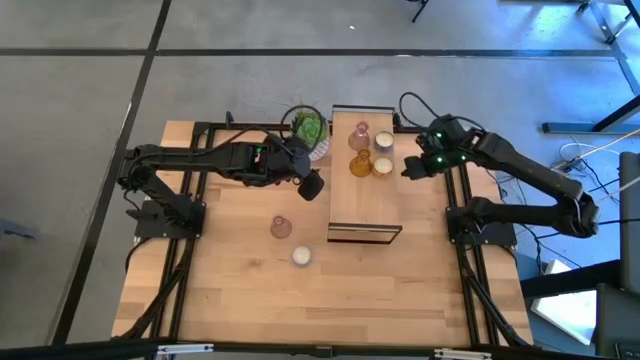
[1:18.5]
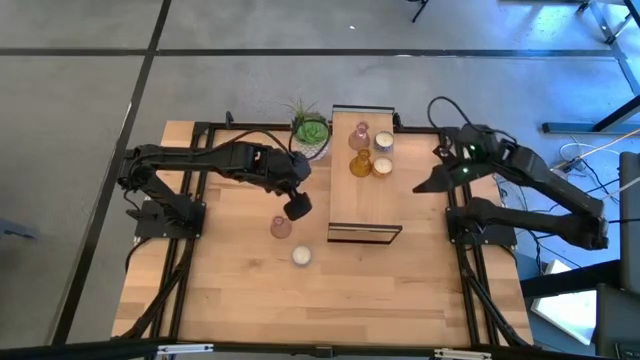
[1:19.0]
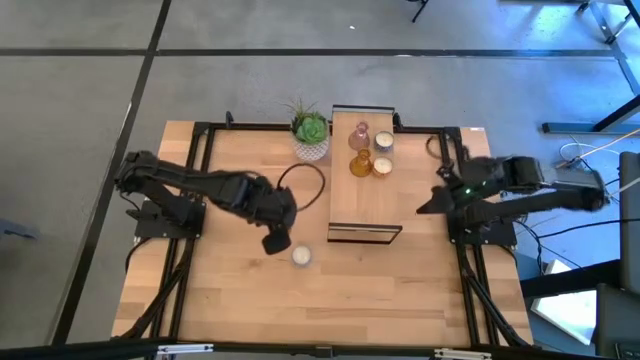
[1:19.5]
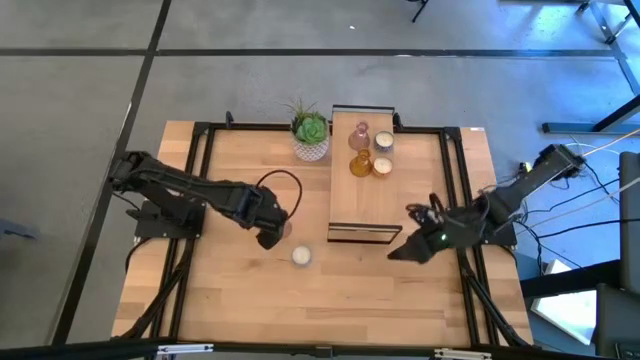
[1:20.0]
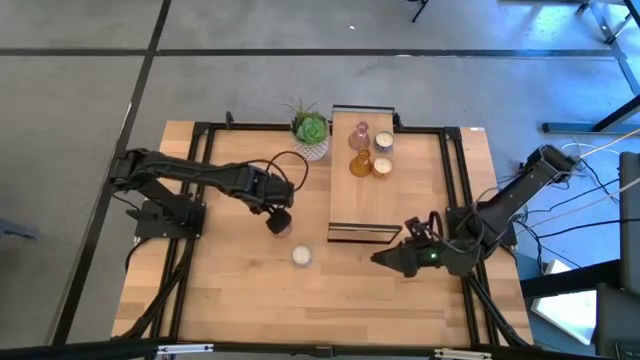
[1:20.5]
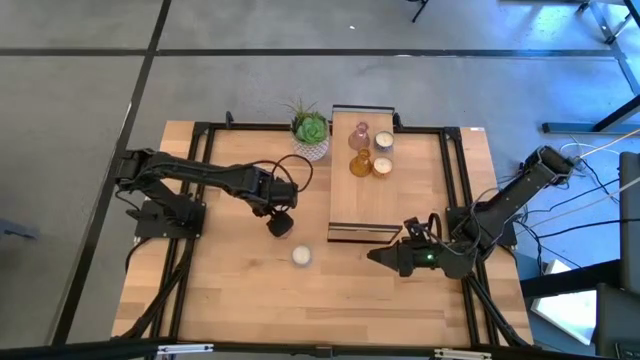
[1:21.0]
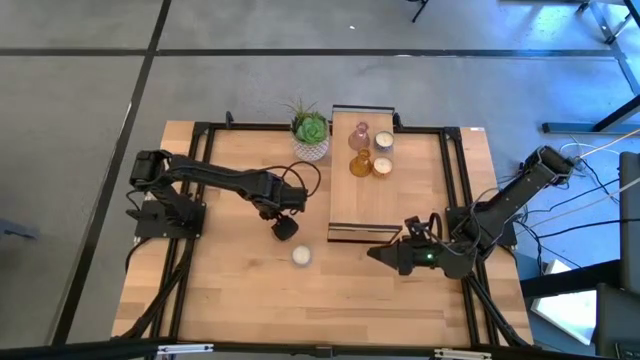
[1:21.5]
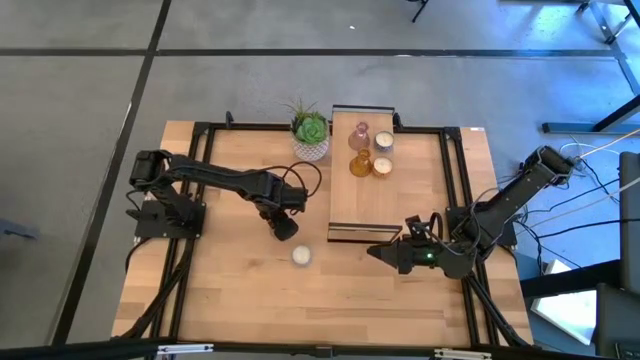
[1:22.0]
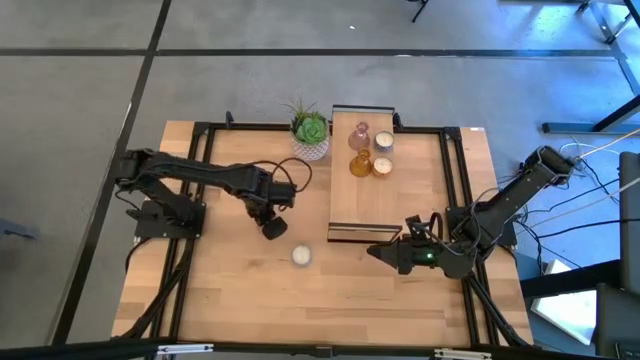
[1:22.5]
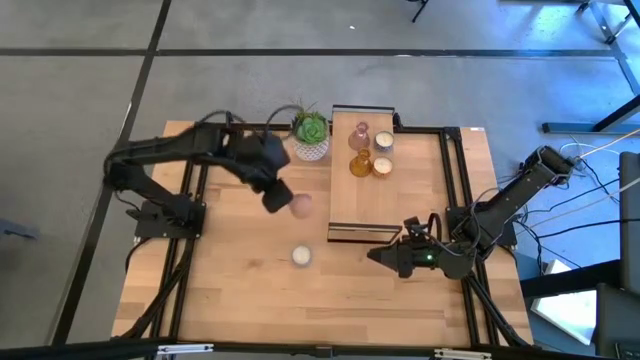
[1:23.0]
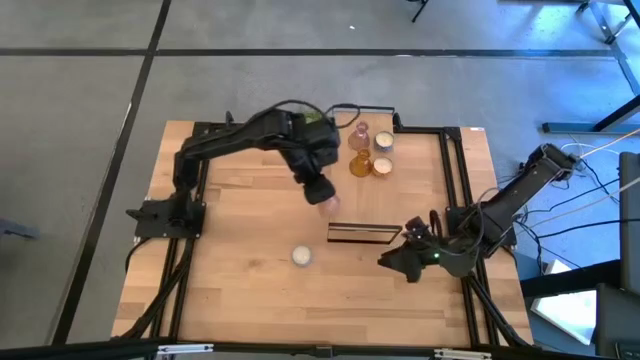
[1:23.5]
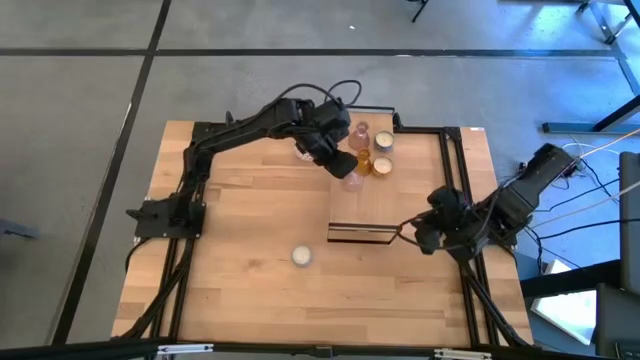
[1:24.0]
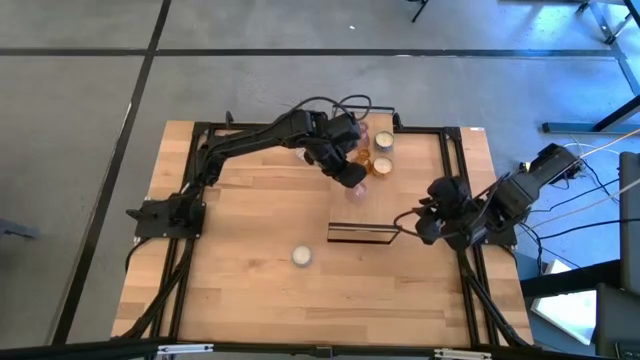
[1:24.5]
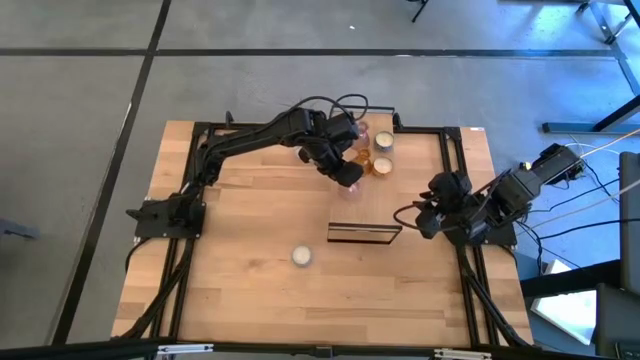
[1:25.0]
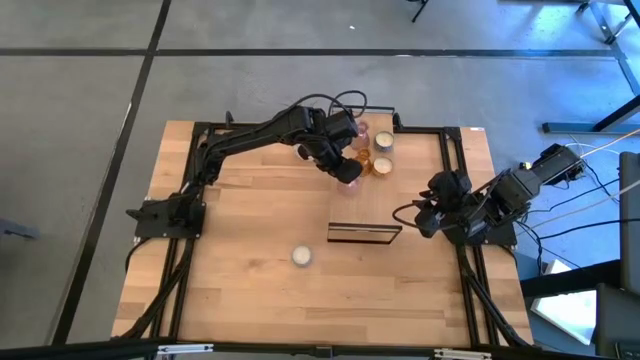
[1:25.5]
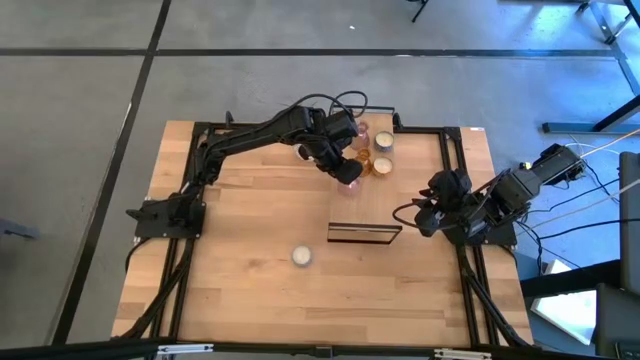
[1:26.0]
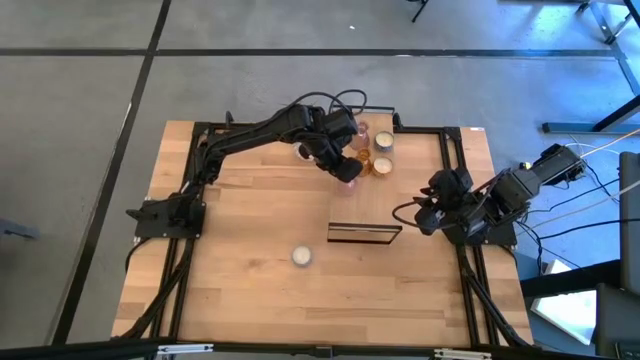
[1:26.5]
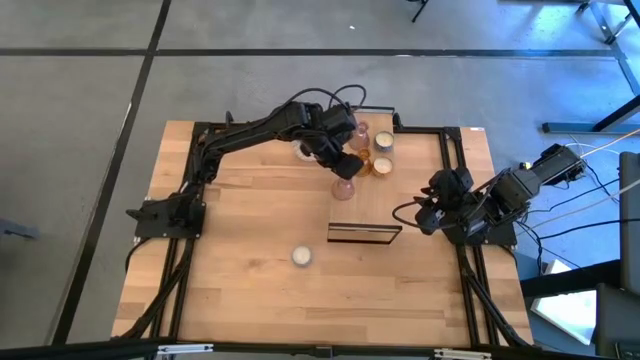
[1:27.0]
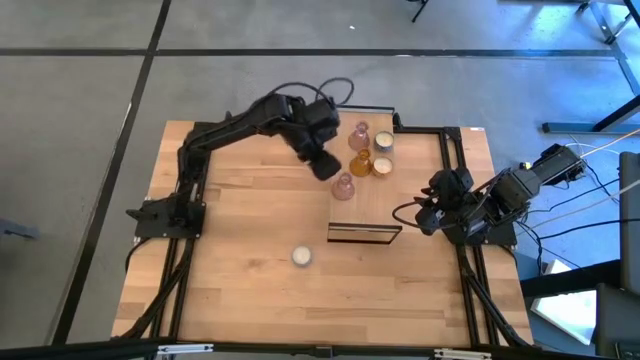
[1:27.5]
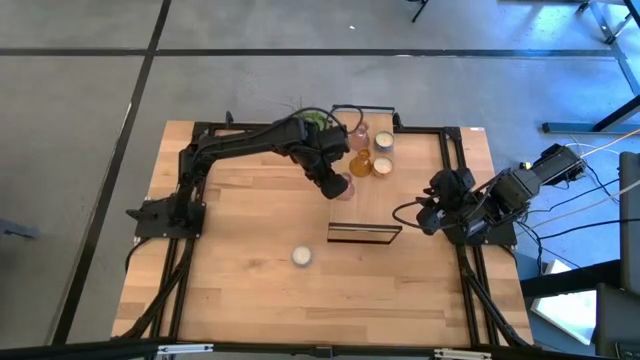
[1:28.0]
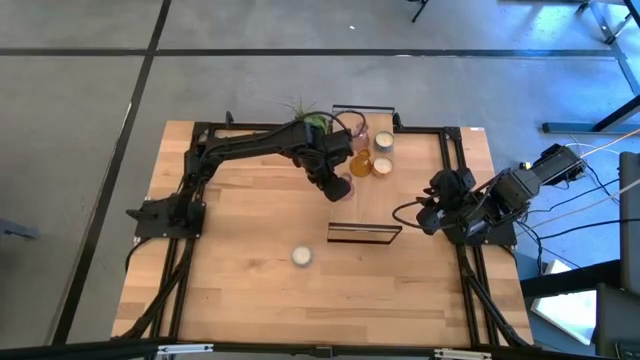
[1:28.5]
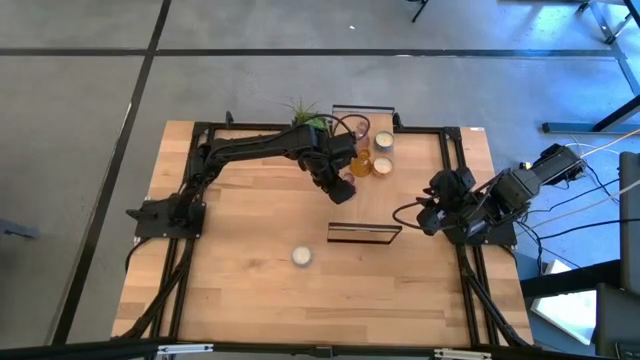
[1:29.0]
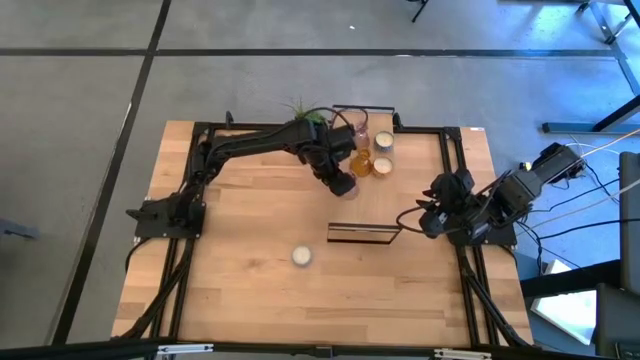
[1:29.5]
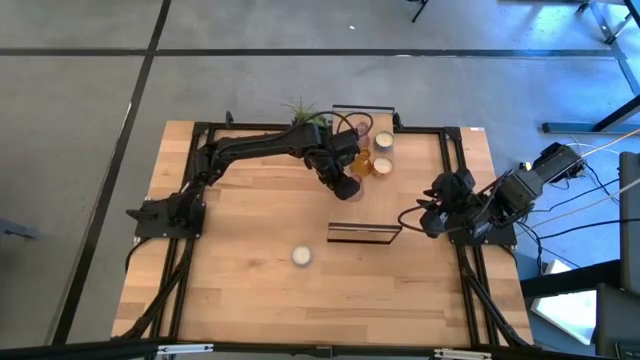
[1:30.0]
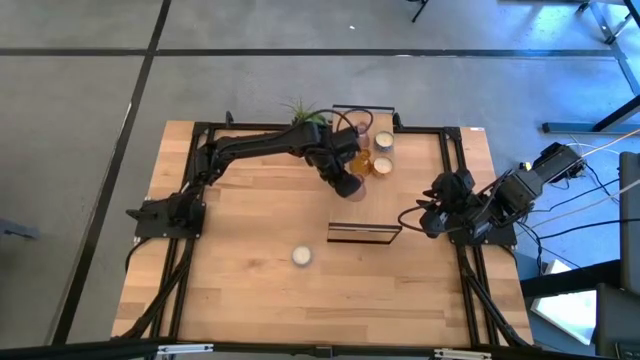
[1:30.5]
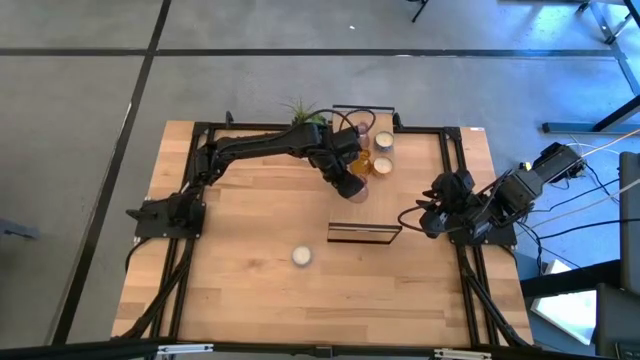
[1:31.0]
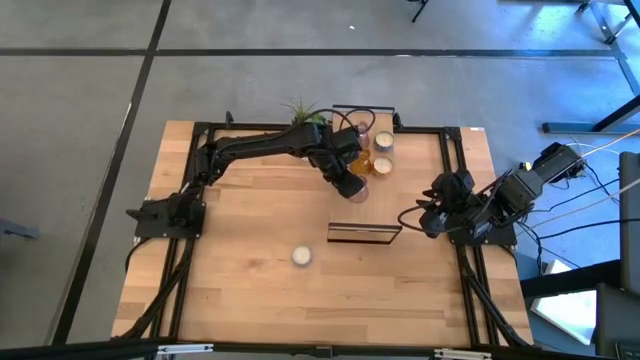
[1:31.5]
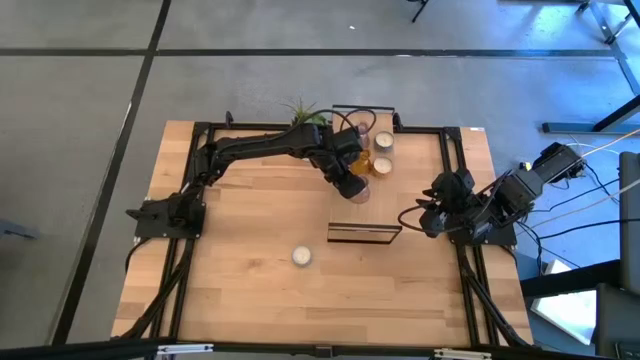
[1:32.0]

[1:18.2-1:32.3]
Task: Pick & Place candle stick holders
Put the pink glass candle holder on the shelf aligned with the orange glass candle holder

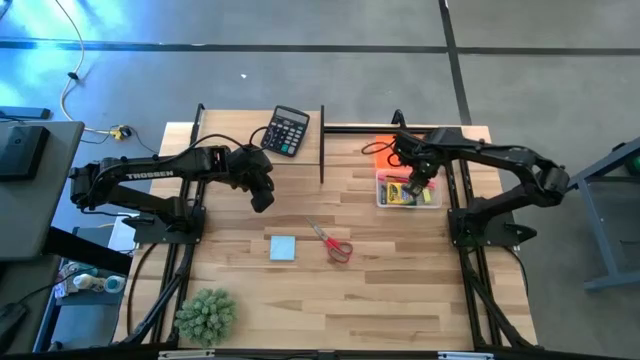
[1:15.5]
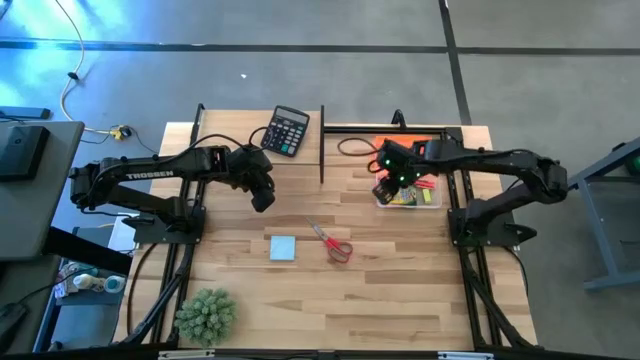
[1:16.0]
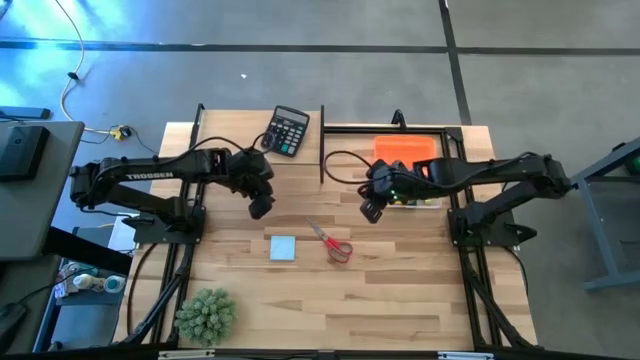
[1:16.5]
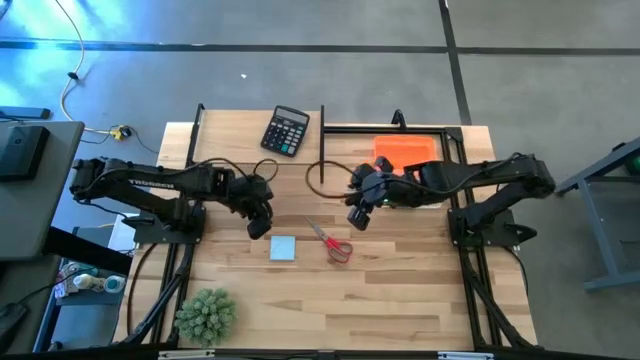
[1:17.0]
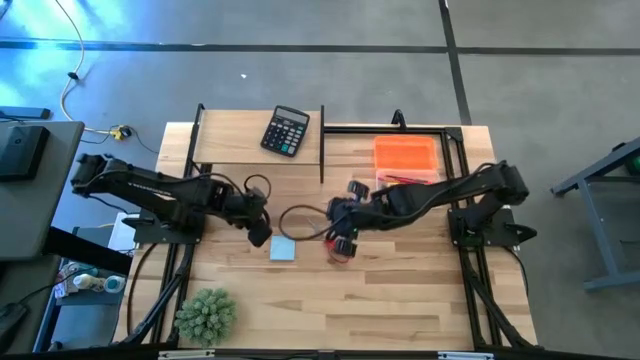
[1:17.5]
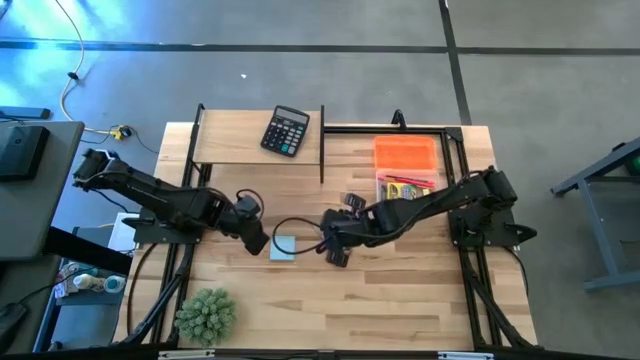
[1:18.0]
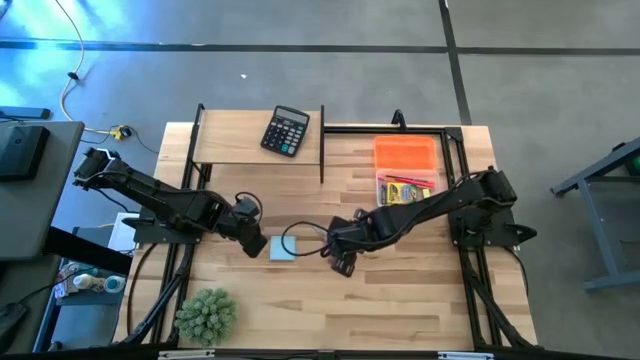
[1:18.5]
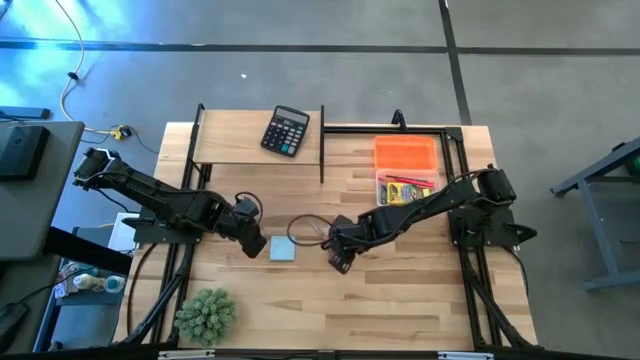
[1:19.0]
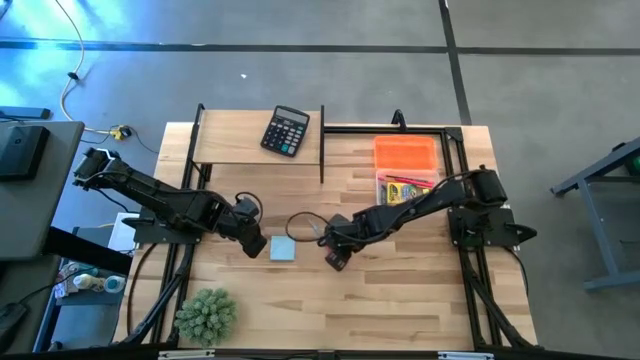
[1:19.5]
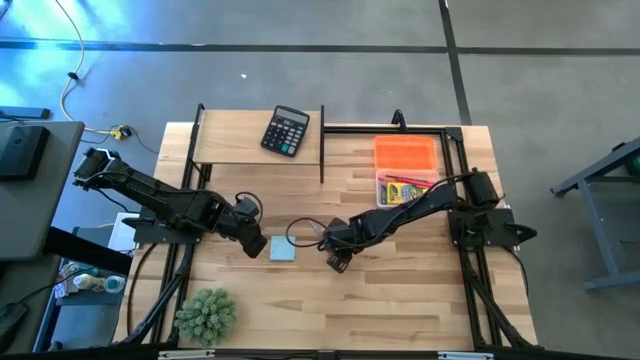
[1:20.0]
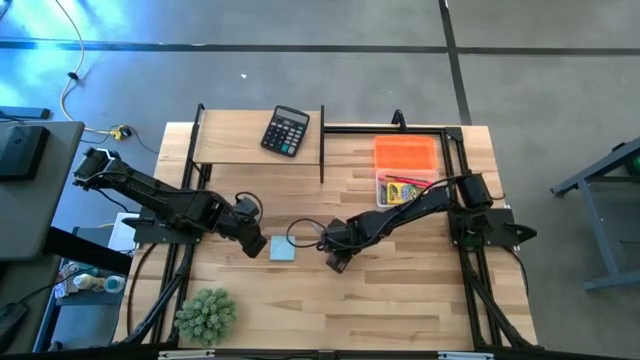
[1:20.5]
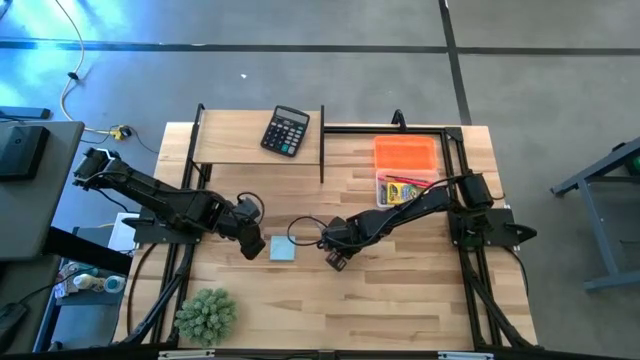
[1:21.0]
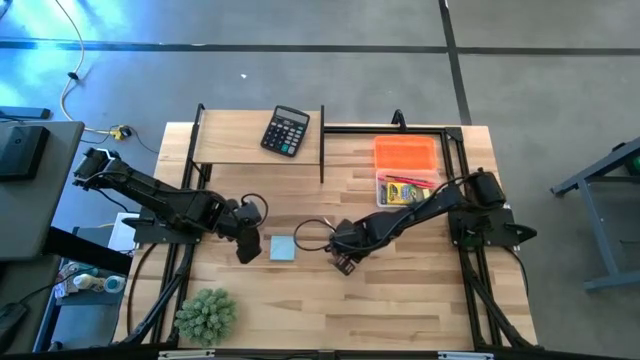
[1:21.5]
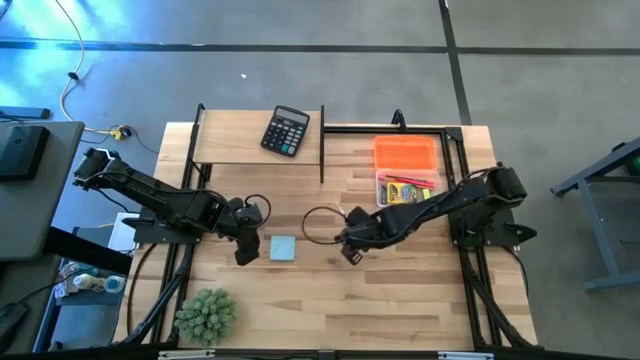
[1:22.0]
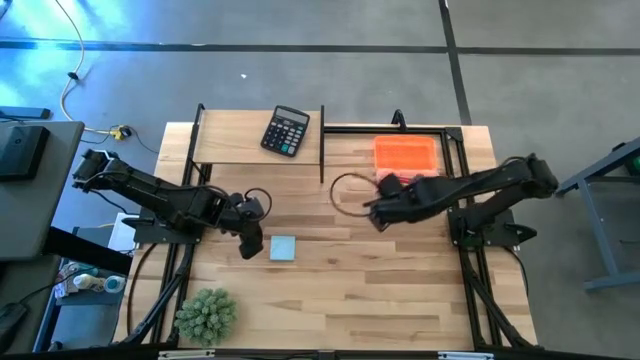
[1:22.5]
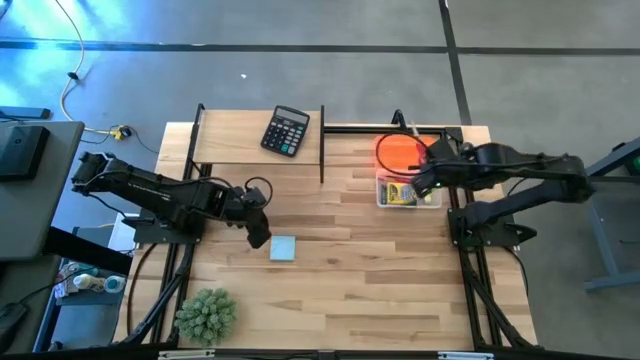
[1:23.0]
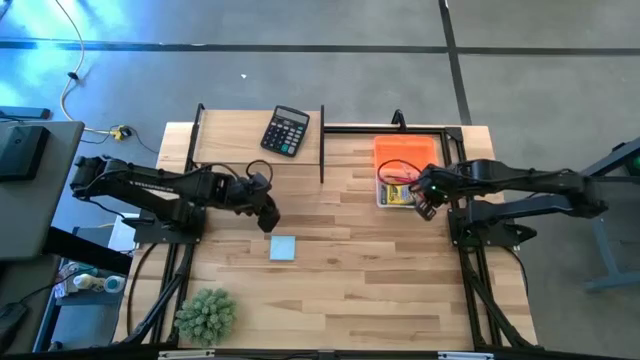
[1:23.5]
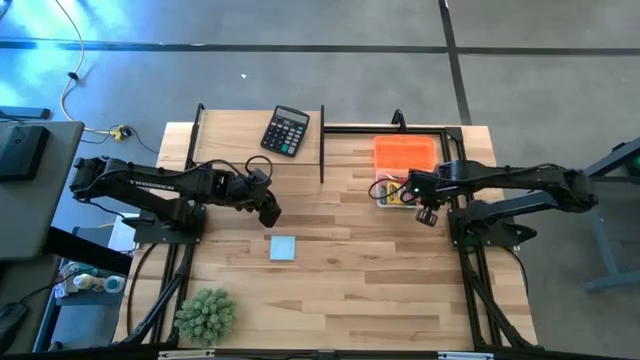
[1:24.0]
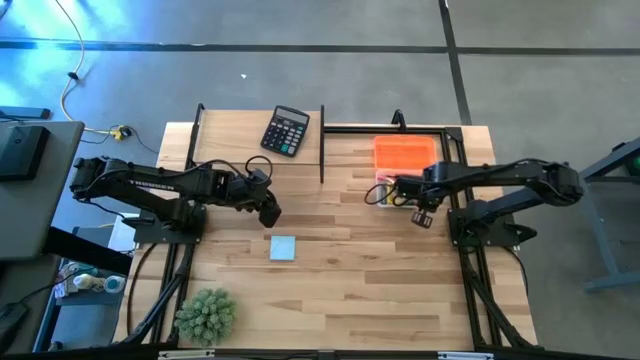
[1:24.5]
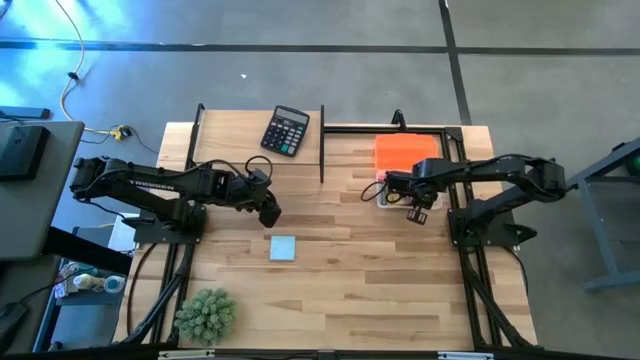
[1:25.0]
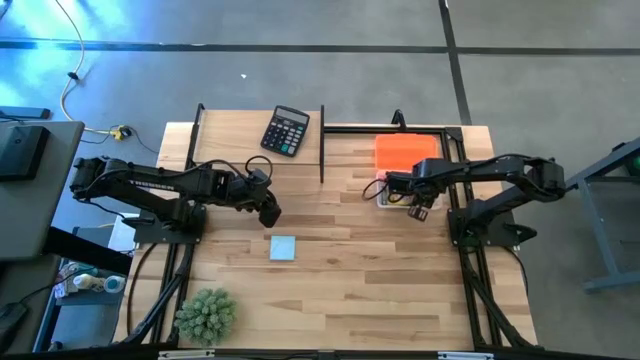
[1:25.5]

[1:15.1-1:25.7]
Task: Pack school essentials
Put the red scissors into the orange supply box
